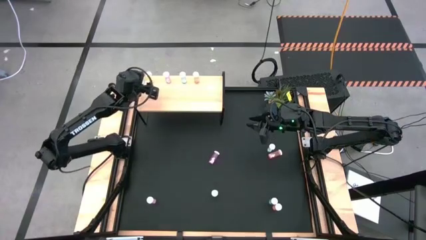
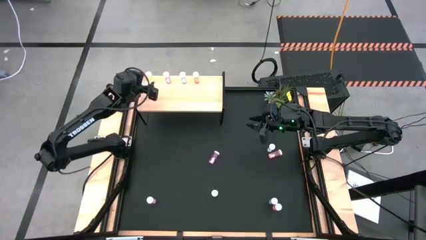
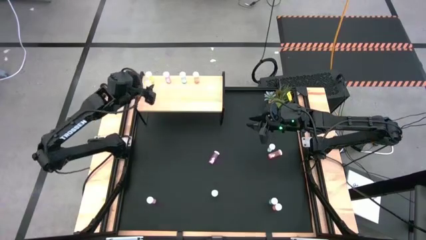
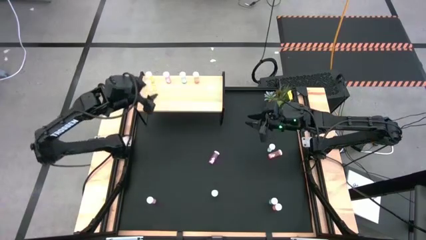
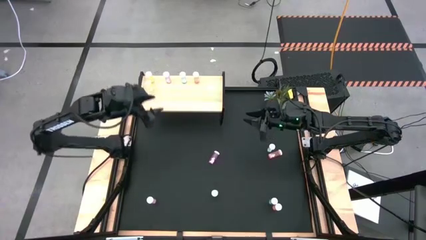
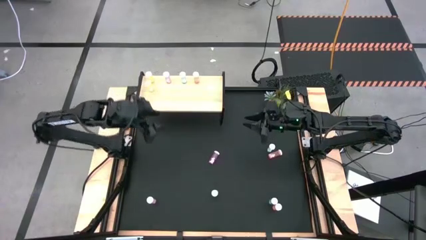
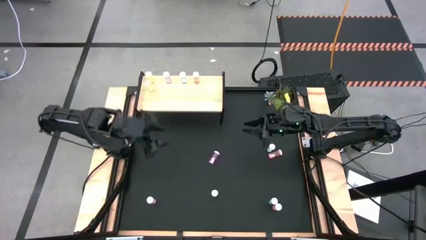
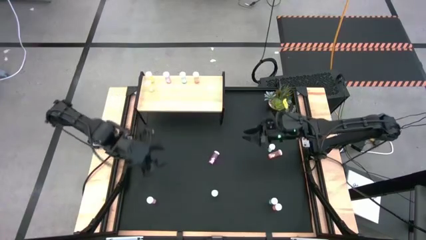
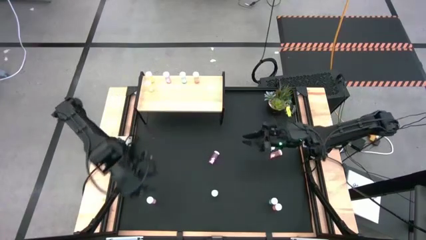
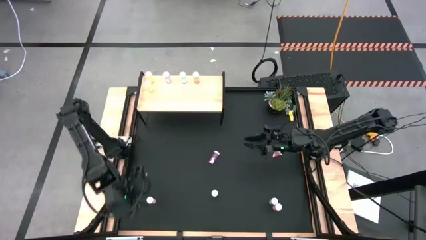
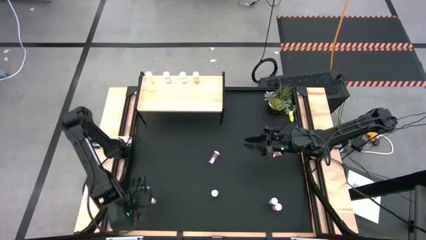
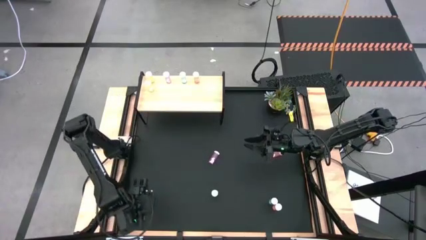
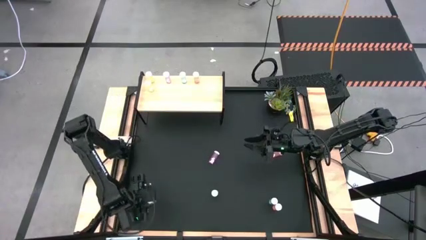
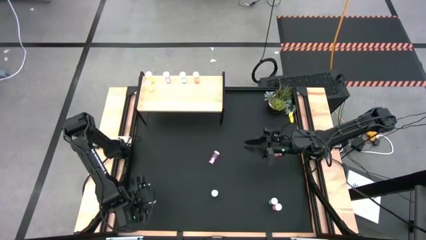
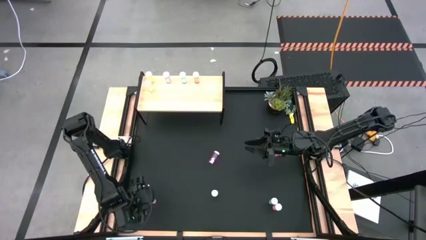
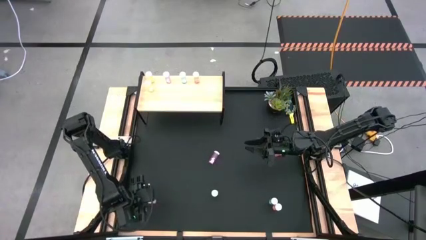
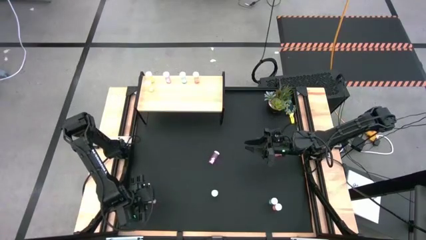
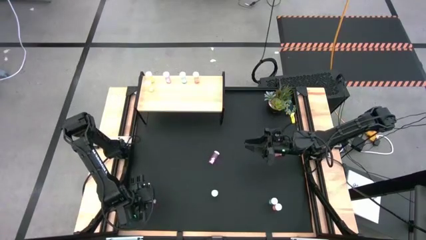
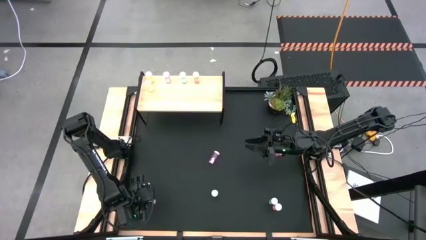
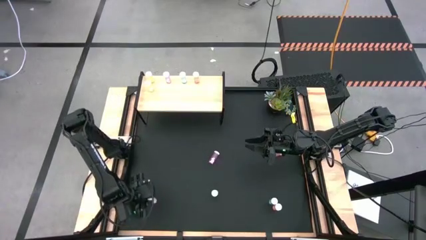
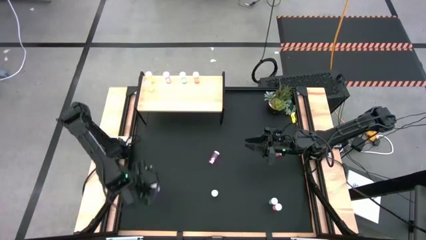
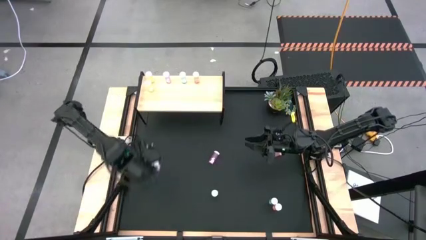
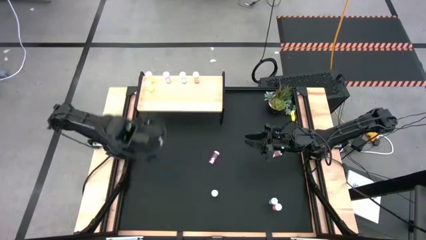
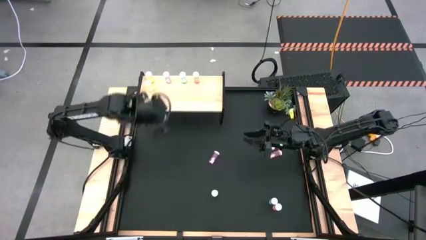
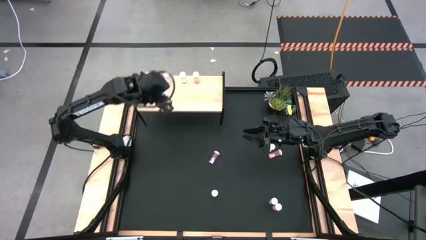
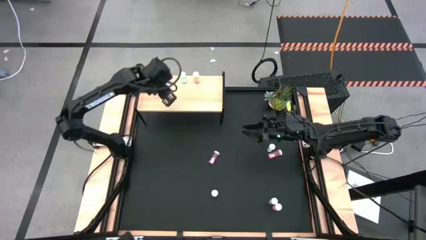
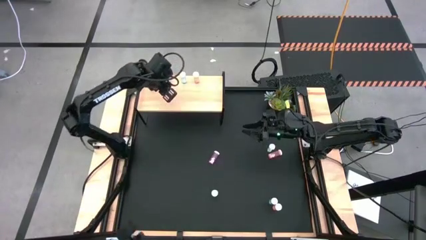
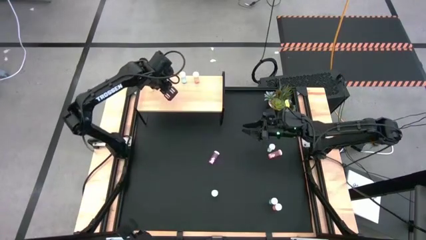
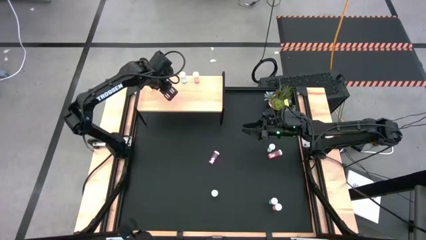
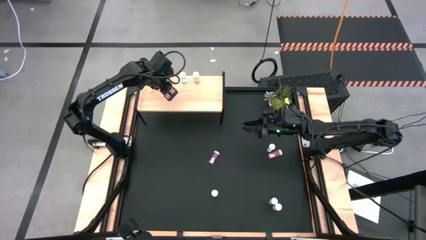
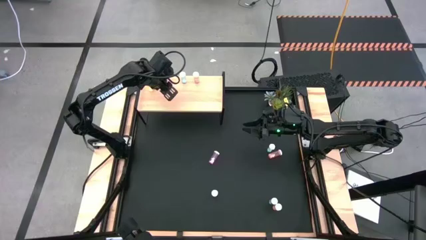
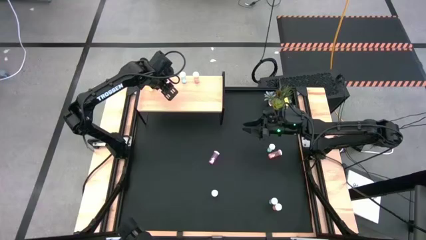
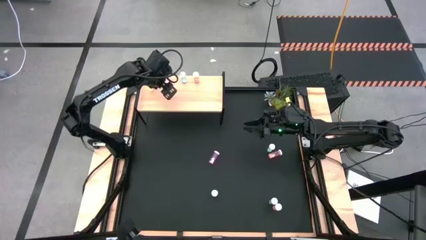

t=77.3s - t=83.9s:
Task: Pick and place medicine bottles onto shelf by color
Put the bottom pink medicine bottle aligned with the other pink medicine bottle on the shelf

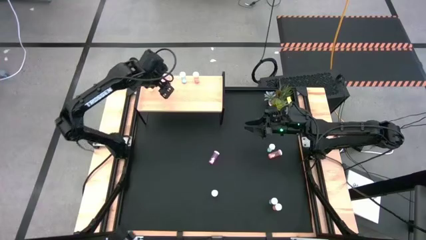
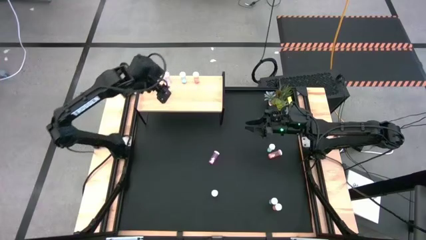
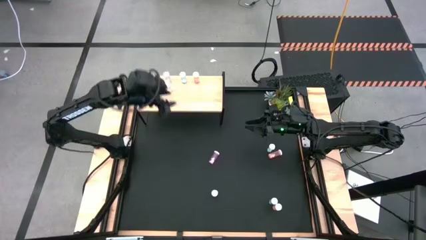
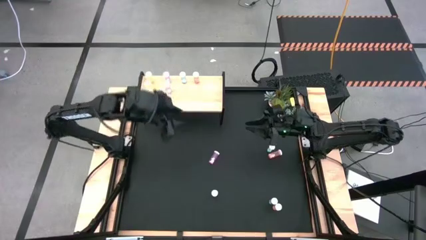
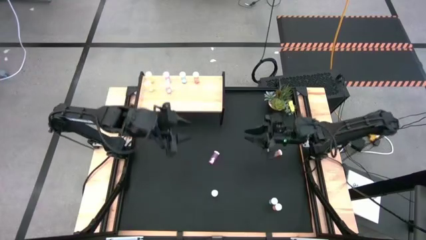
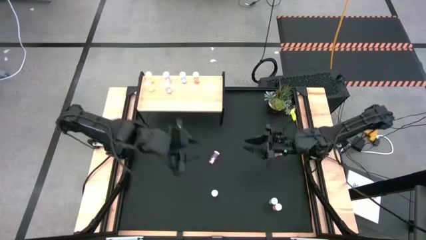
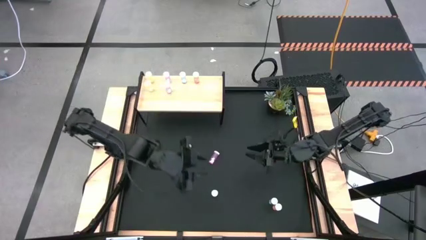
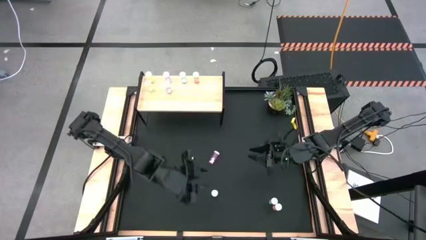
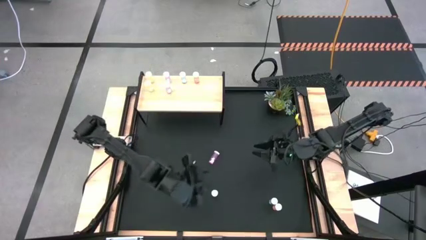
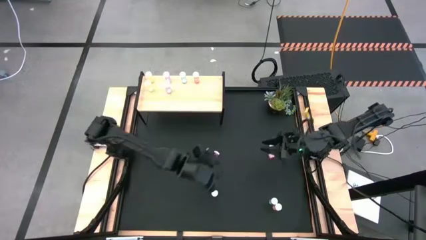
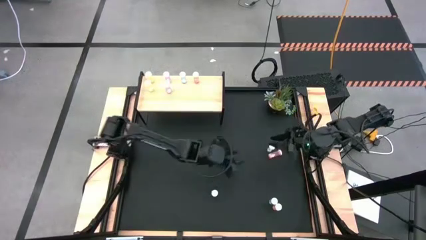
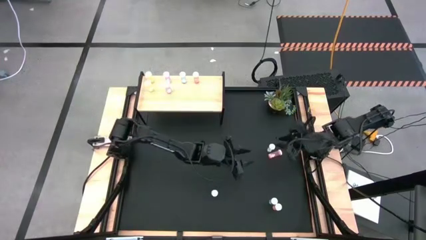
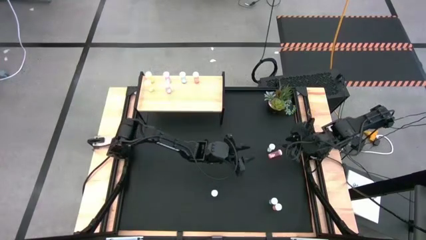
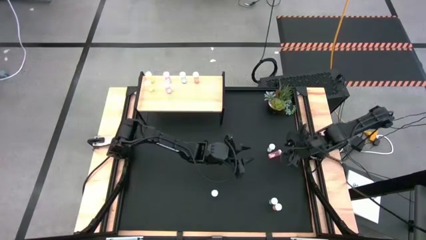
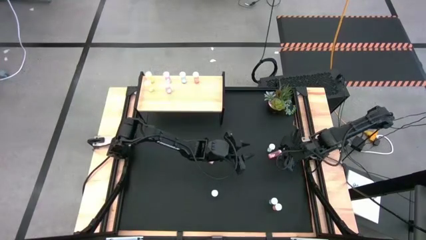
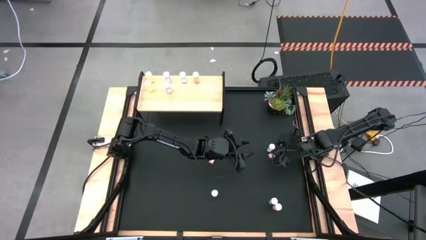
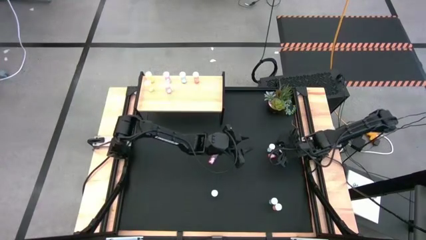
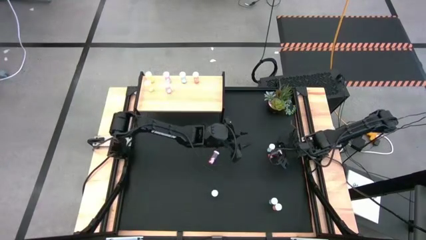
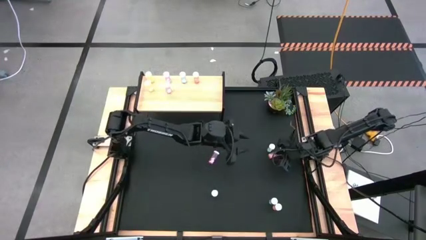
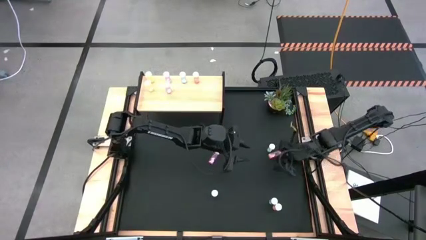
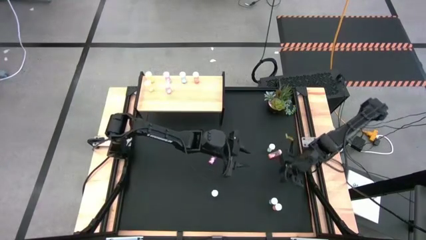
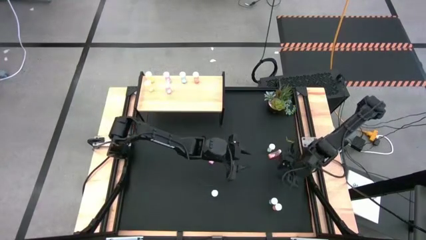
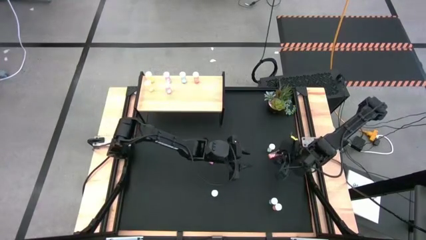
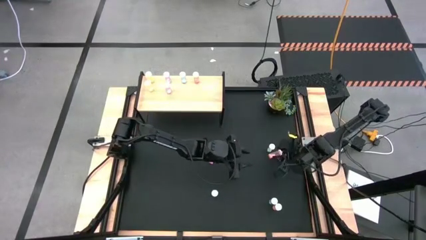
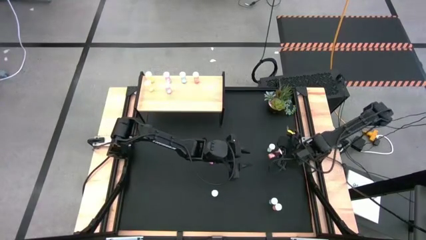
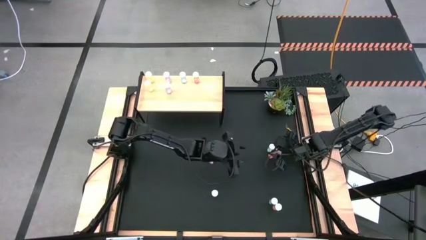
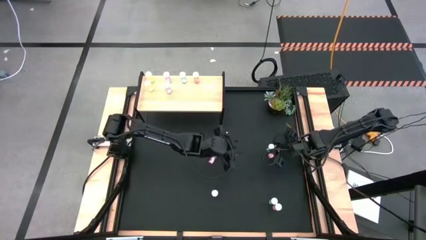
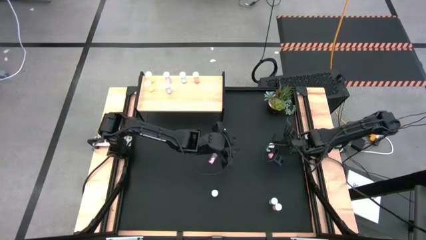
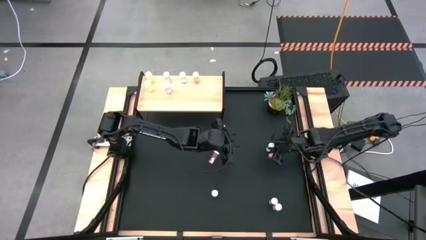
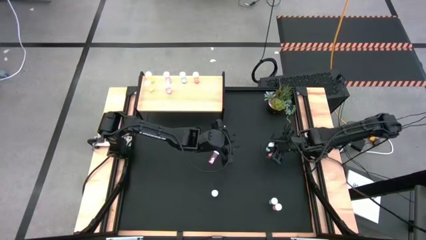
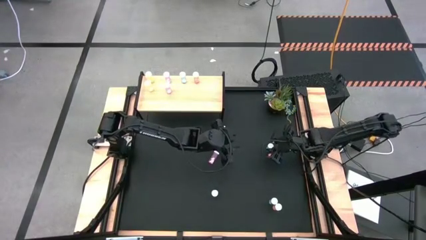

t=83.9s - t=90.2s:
Put the top blue medicine bottle aligned with the other blue medicine bottle on the shelf
